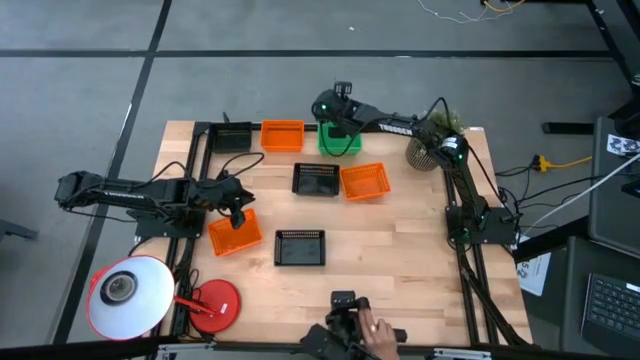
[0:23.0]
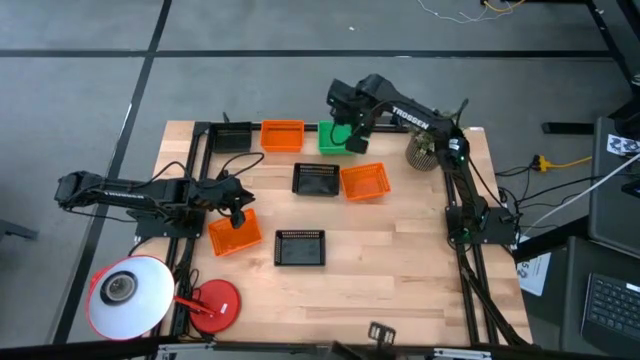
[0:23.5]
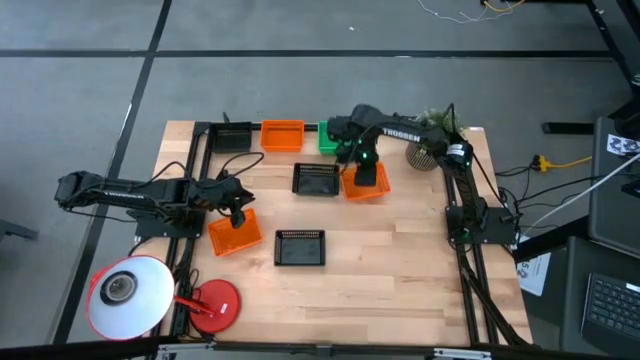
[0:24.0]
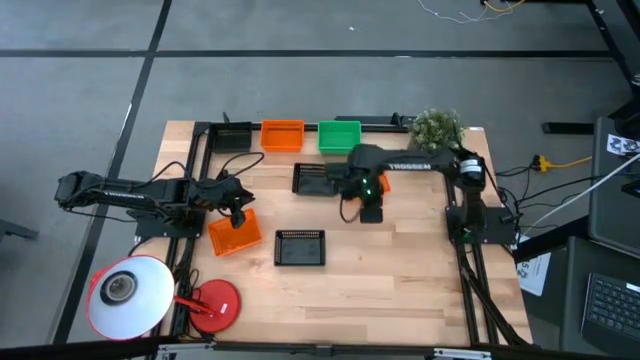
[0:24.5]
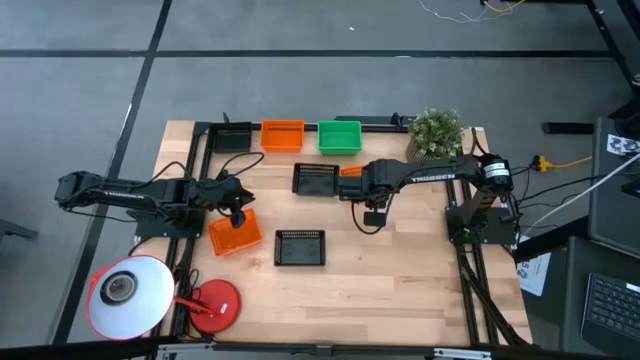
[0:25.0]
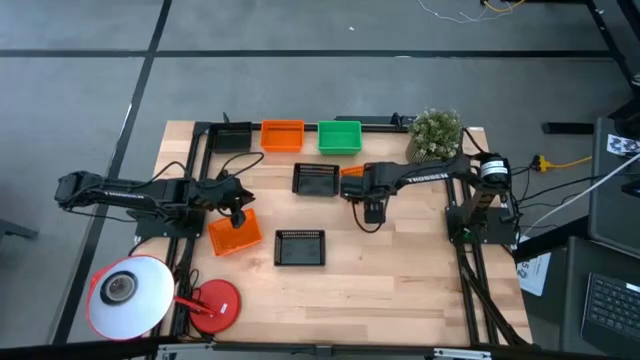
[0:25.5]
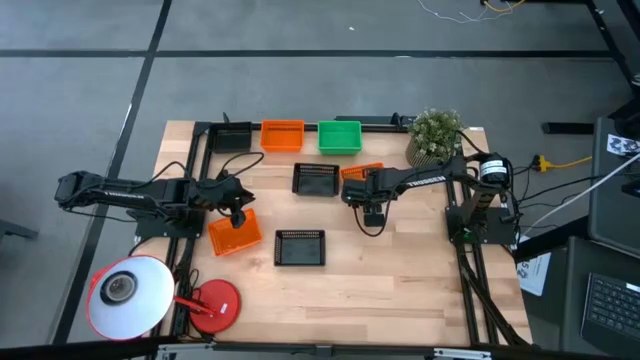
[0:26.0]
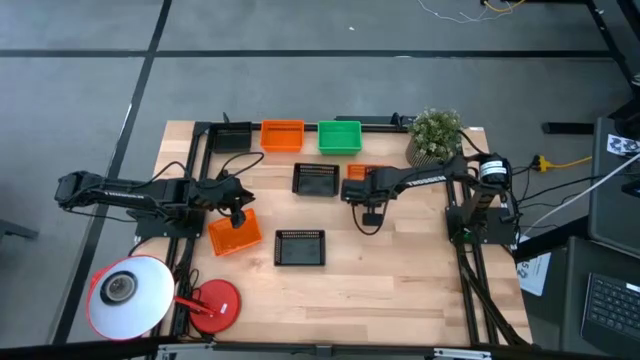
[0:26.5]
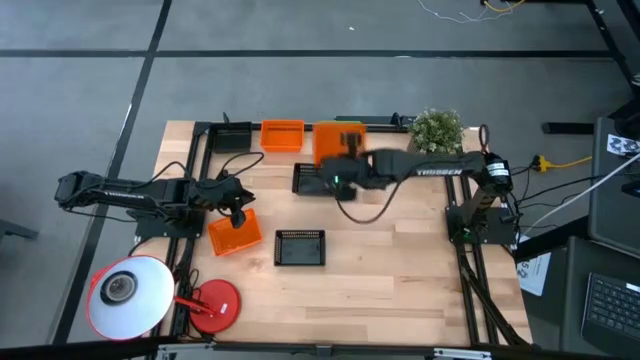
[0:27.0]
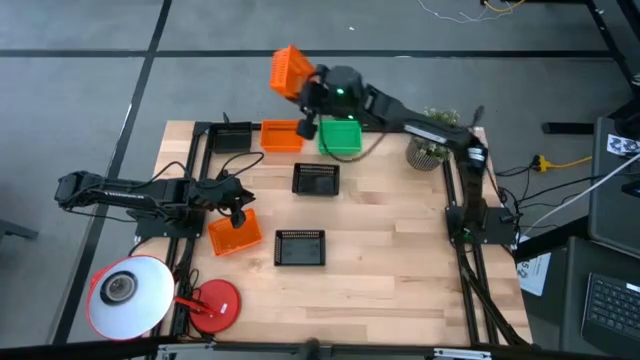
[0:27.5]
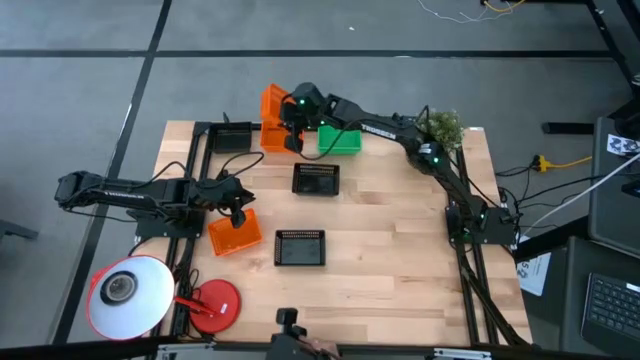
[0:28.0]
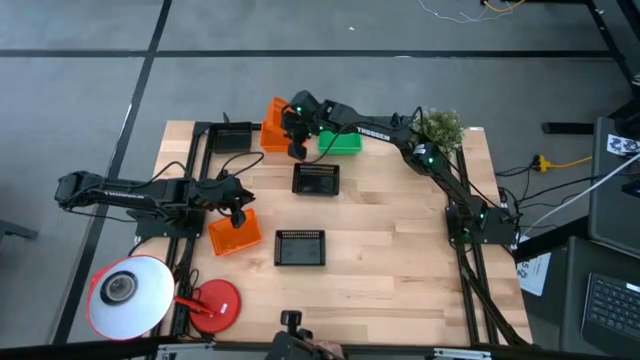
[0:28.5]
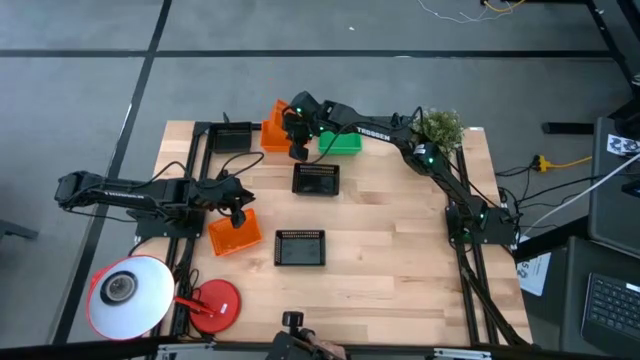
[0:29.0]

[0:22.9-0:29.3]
Stack the top orange bin on the orange bin

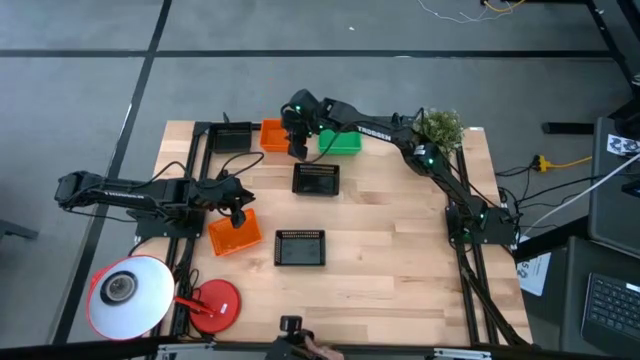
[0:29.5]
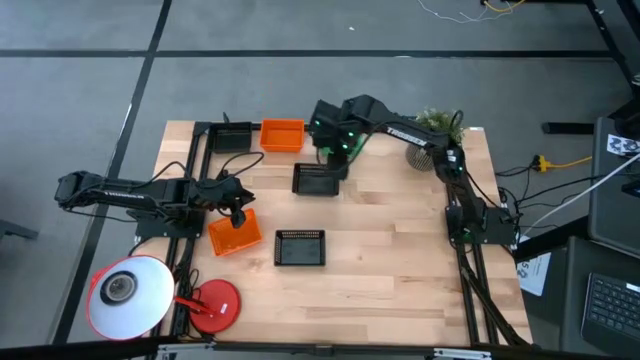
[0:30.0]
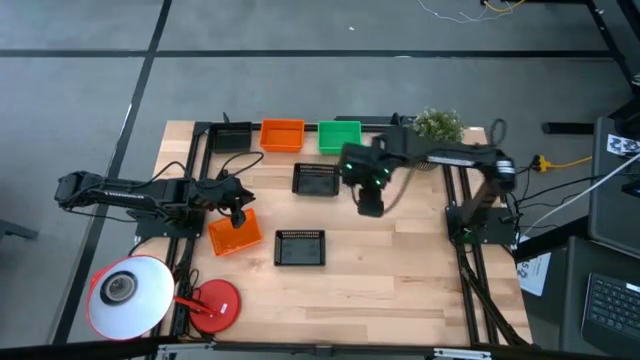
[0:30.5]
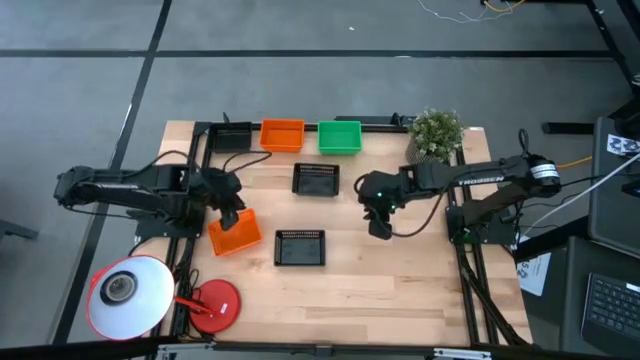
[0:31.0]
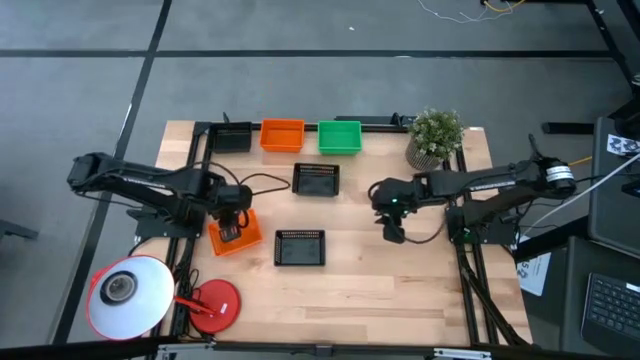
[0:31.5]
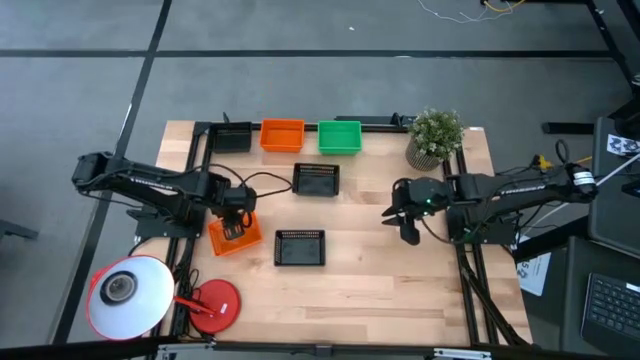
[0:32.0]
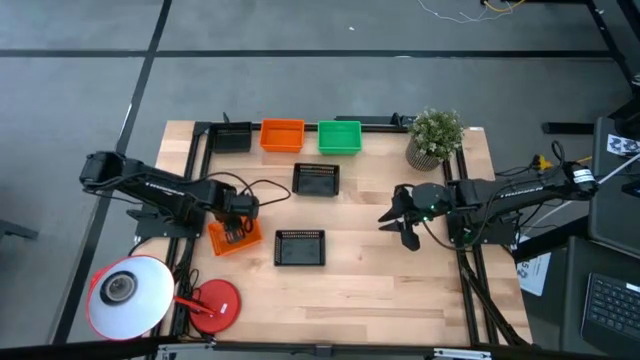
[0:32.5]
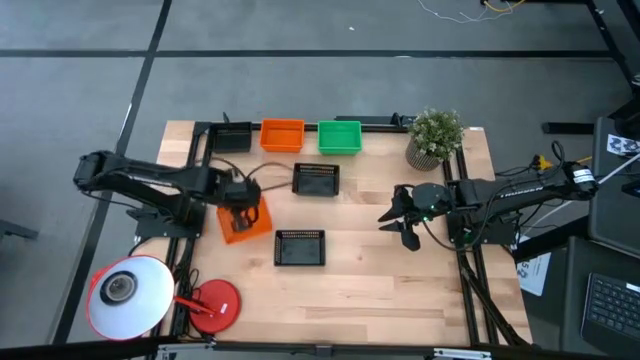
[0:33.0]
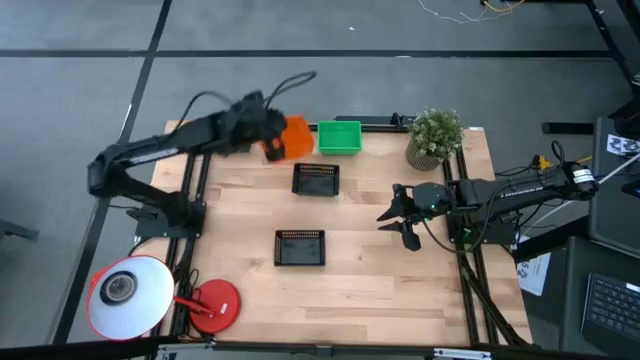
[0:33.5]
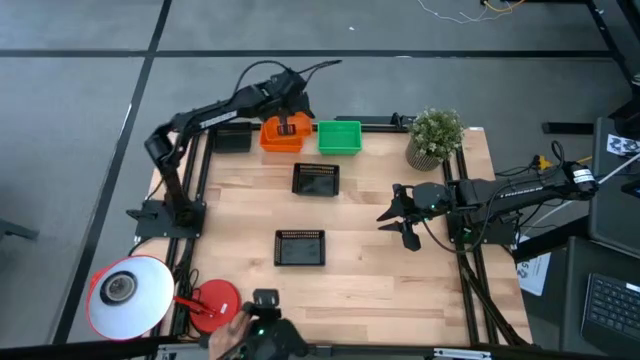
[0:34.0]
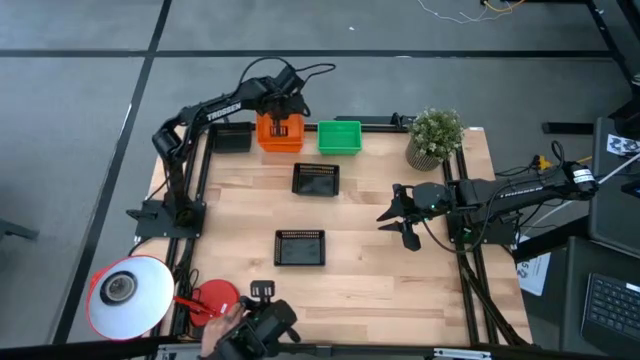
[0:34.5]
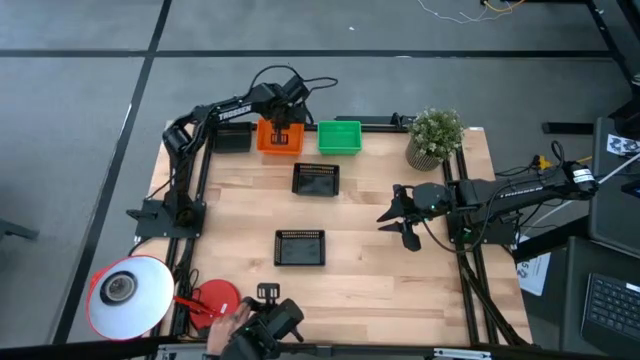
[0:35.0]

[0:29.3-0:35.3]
Stack the orange bin on the orange bin

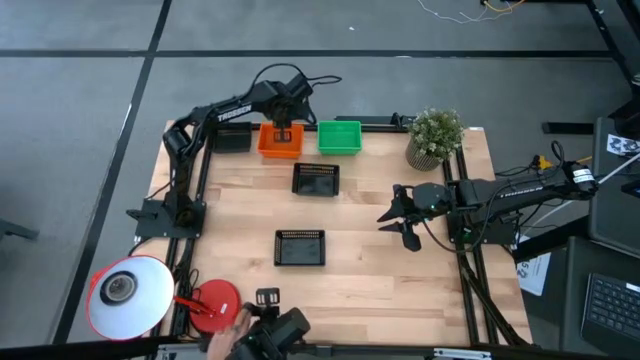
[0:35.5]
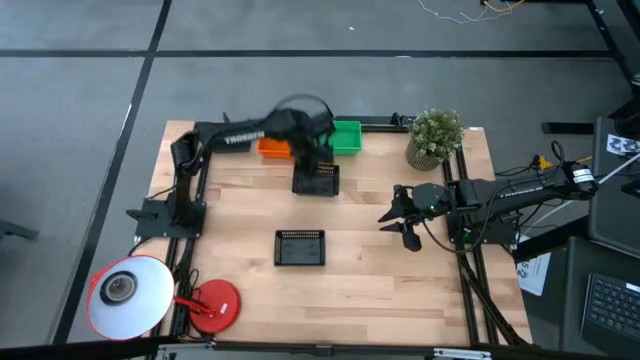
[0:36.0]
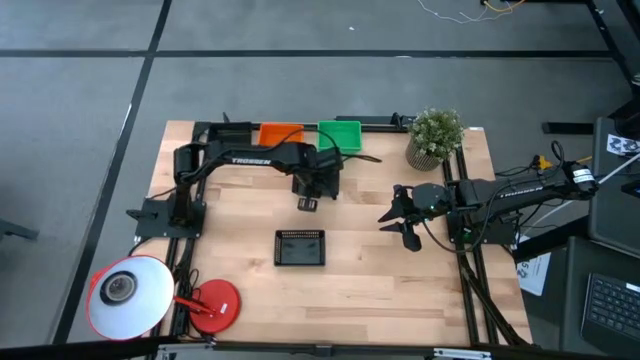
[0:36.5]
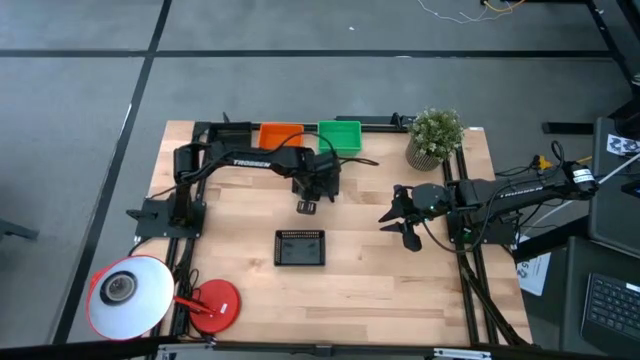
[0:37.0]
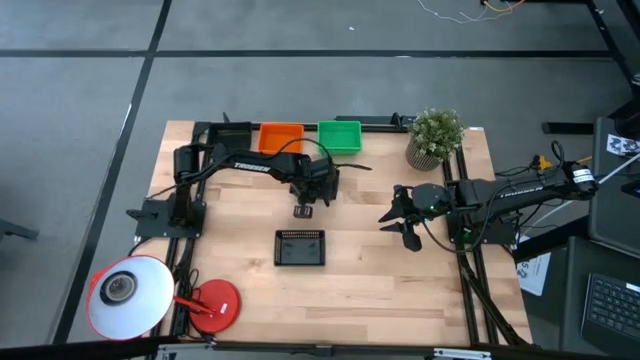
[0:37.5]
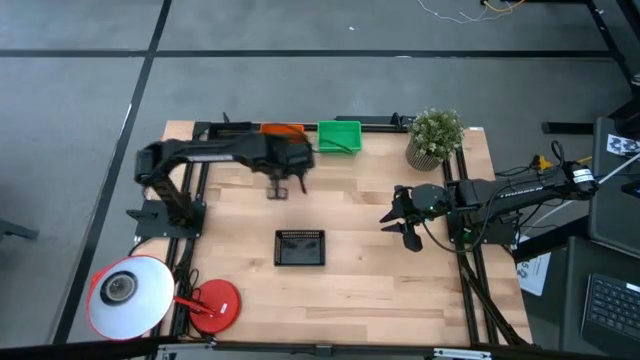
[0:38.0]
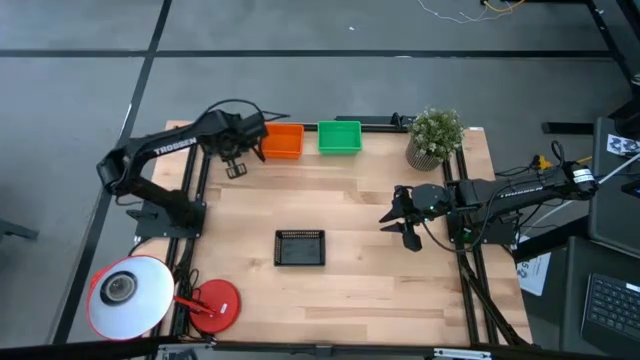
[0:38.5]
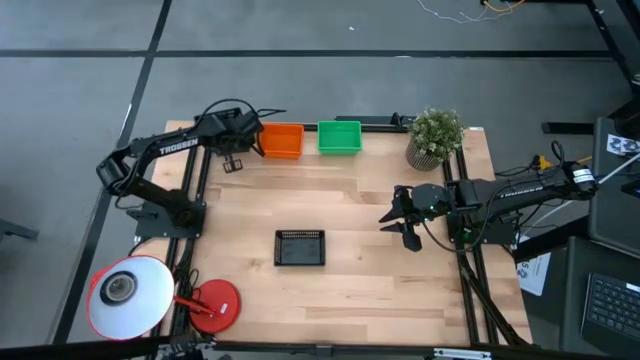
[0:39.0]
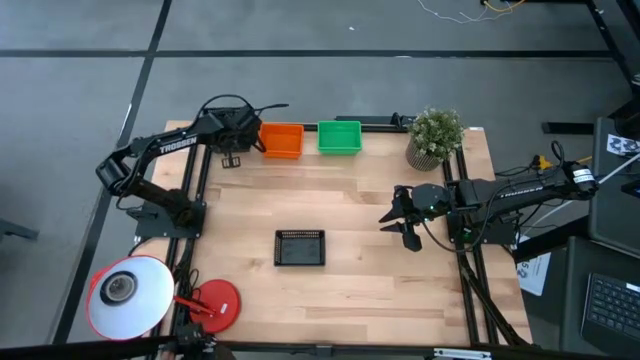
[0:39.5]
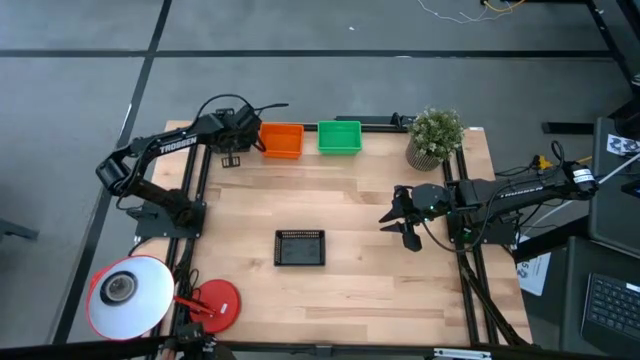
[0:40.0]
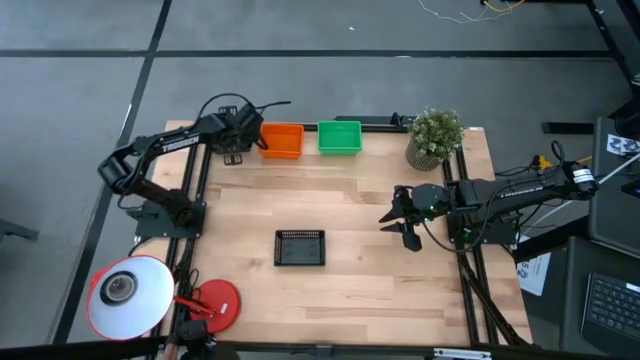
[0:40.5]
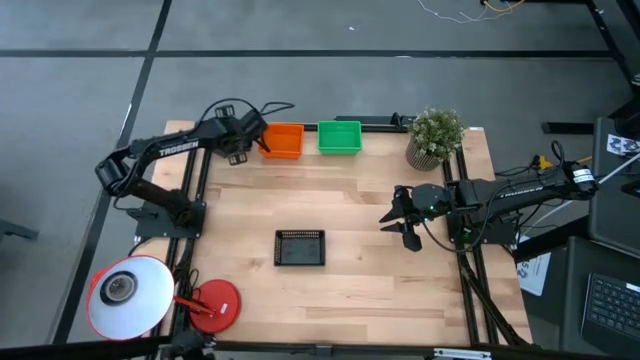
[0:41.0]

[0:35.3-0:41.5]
Stack the top black bin on the black bin

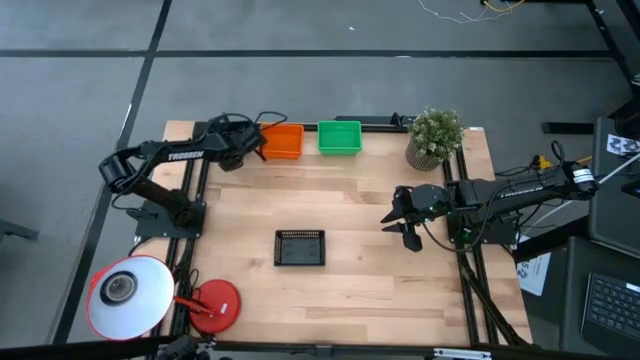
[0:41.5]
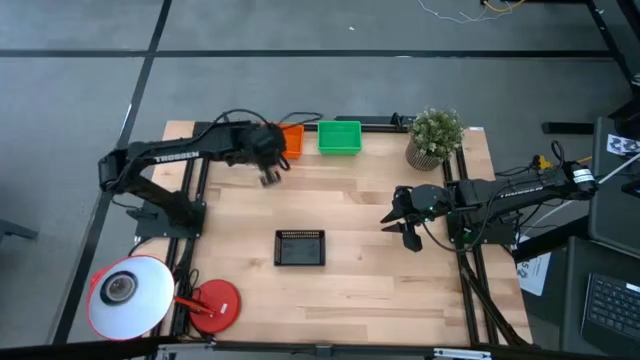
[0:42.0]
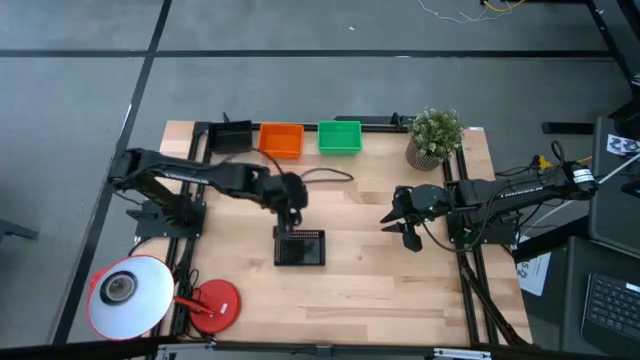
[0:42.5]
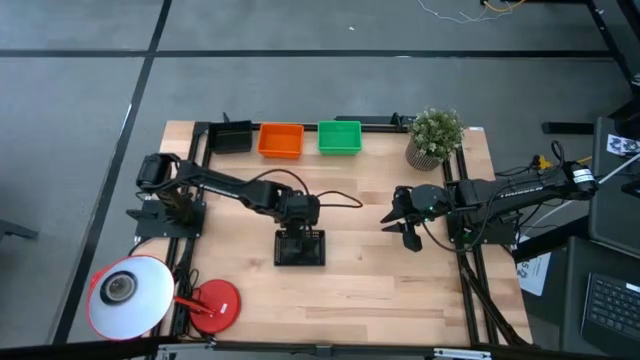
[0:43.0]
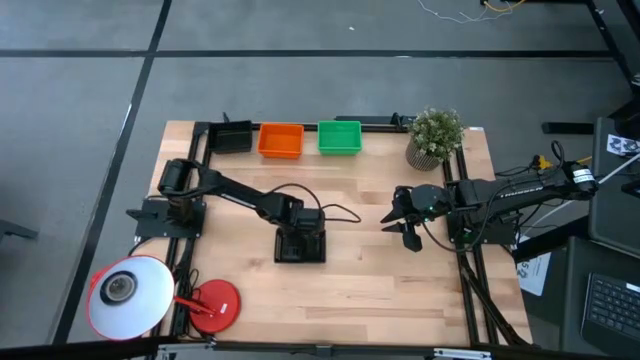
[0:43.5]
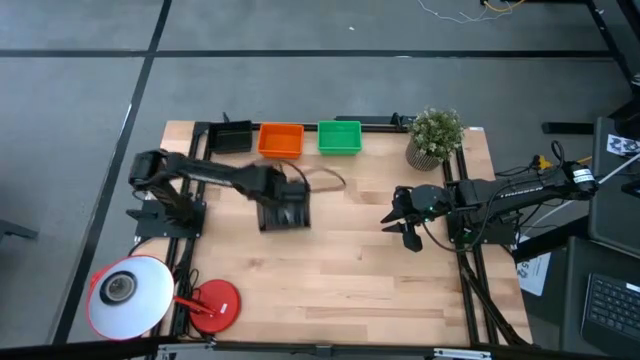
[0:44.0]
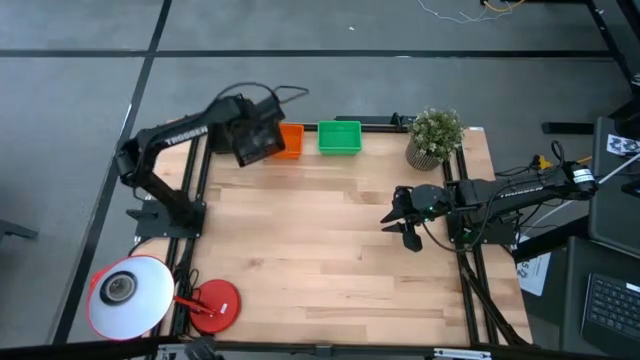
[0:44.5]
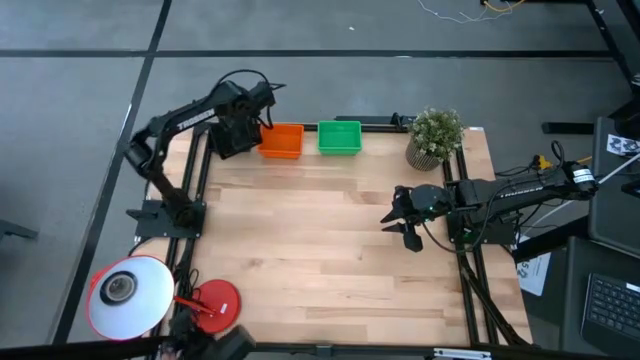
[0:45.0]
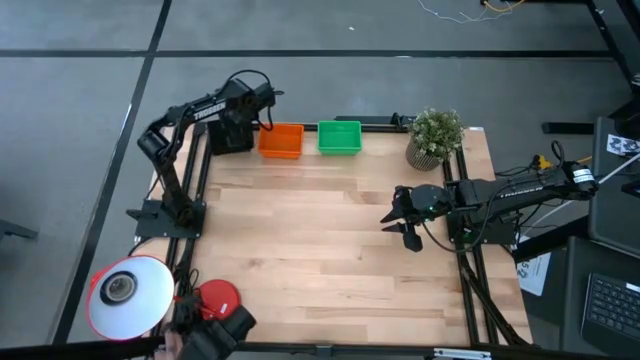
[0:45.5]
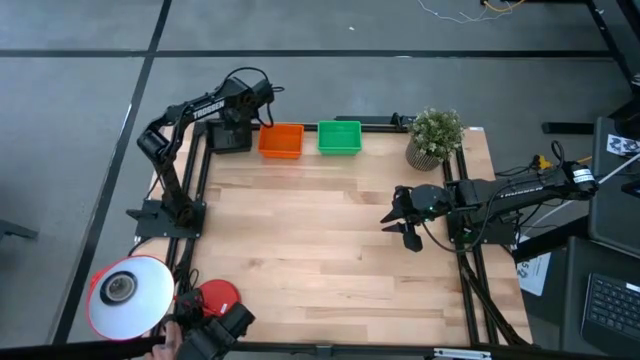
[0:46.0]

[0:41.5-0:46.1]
Stack the black bin on the black bin
